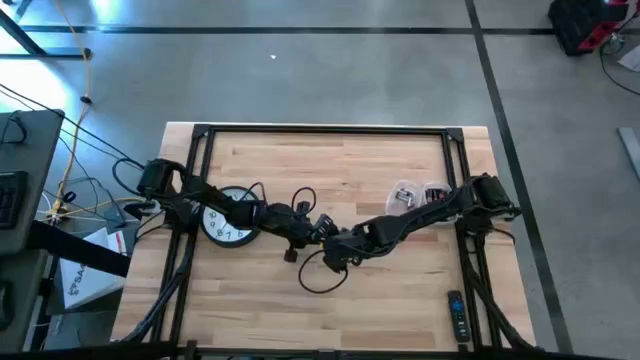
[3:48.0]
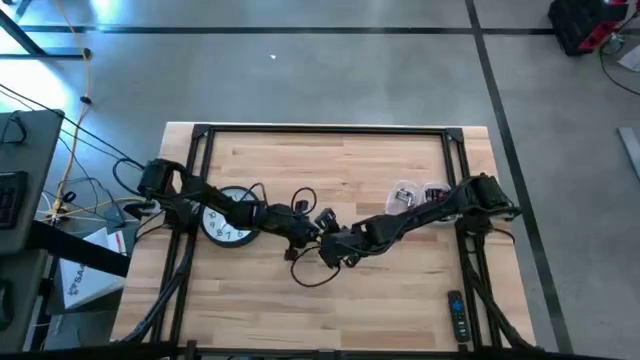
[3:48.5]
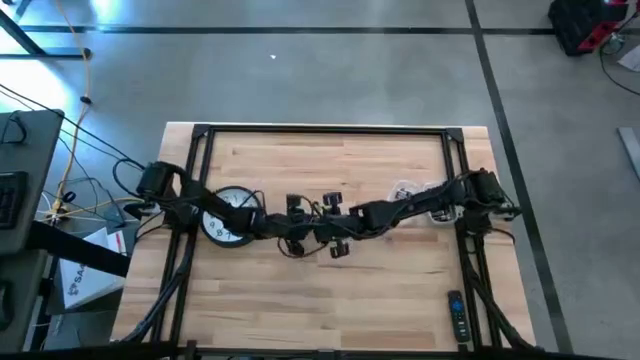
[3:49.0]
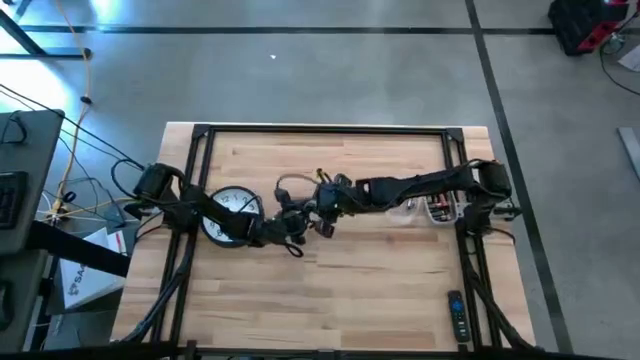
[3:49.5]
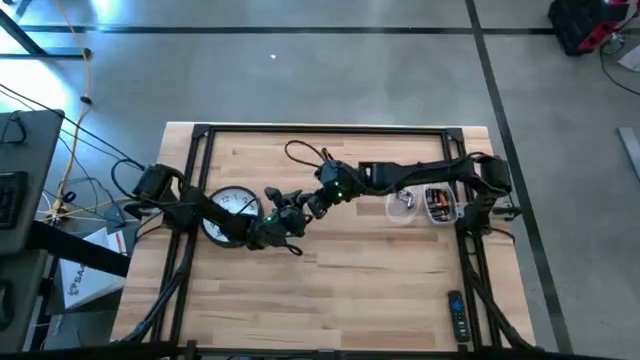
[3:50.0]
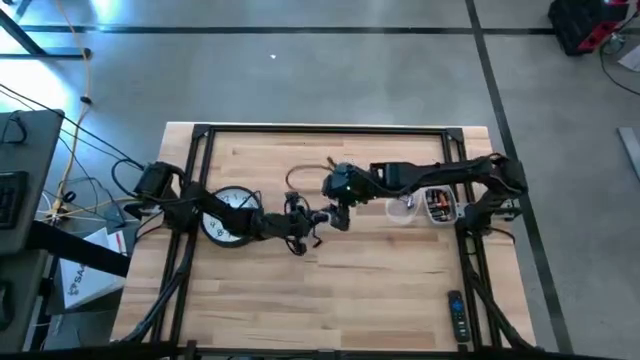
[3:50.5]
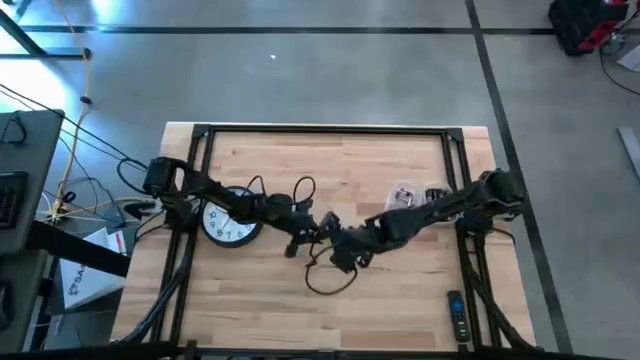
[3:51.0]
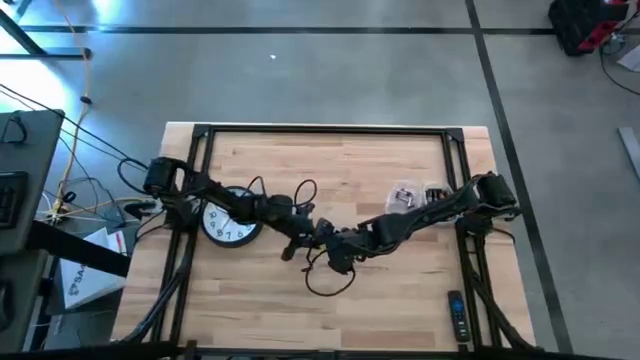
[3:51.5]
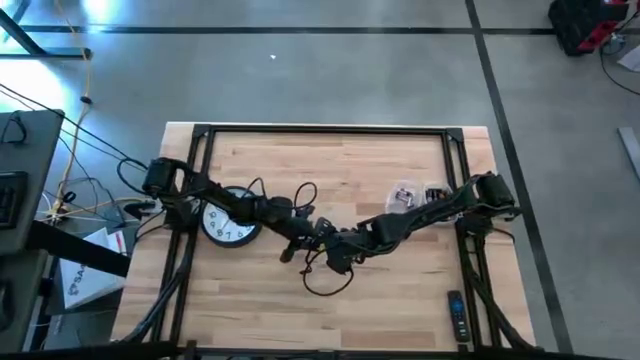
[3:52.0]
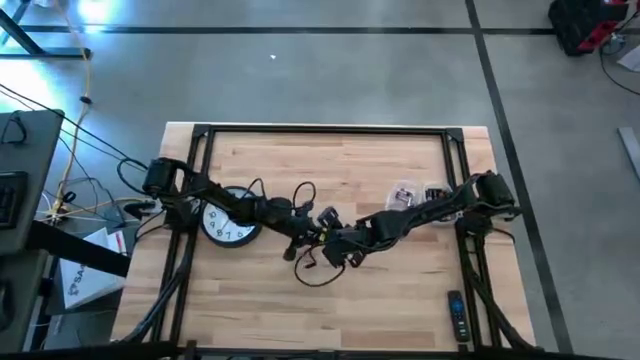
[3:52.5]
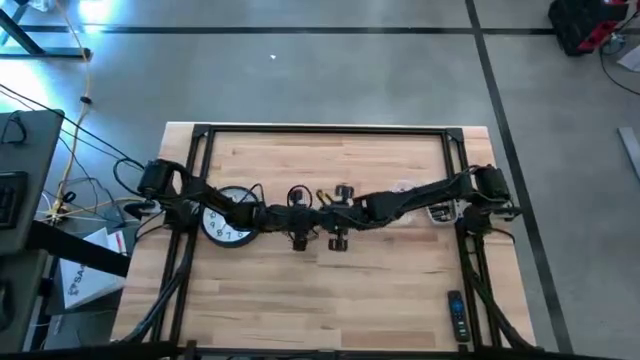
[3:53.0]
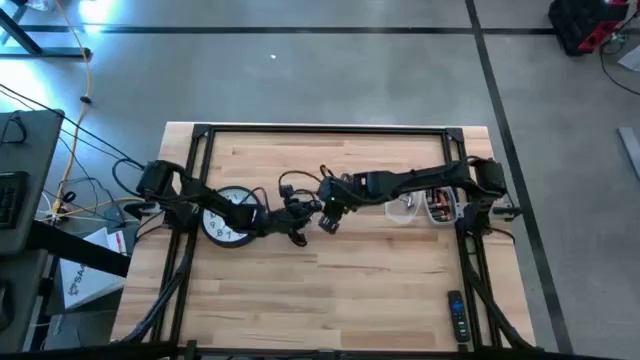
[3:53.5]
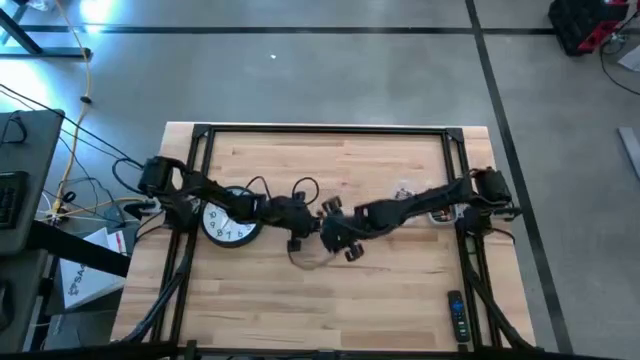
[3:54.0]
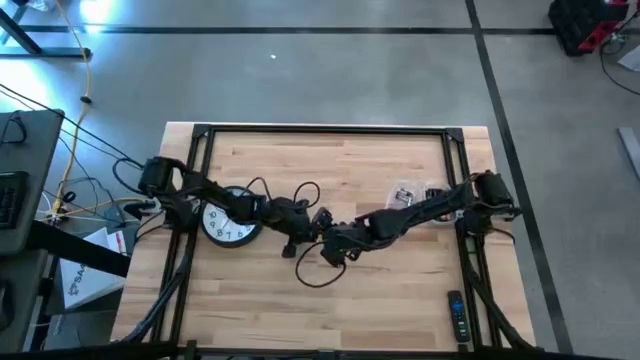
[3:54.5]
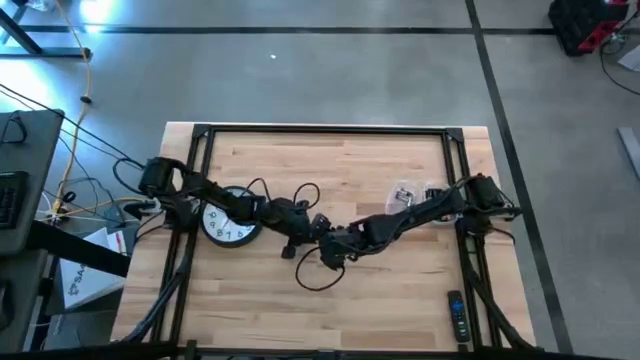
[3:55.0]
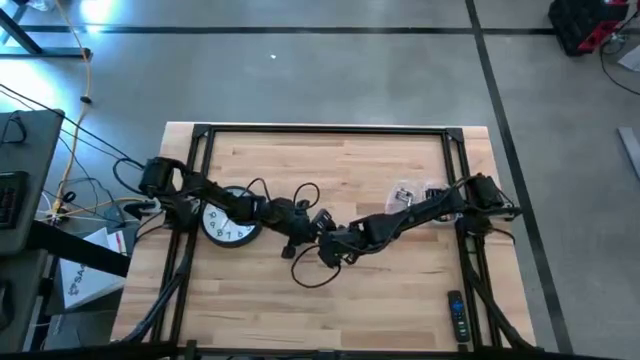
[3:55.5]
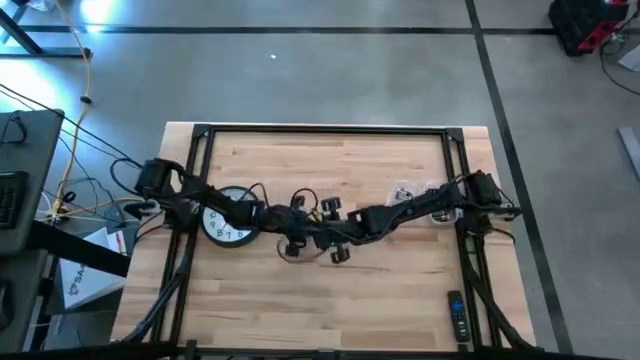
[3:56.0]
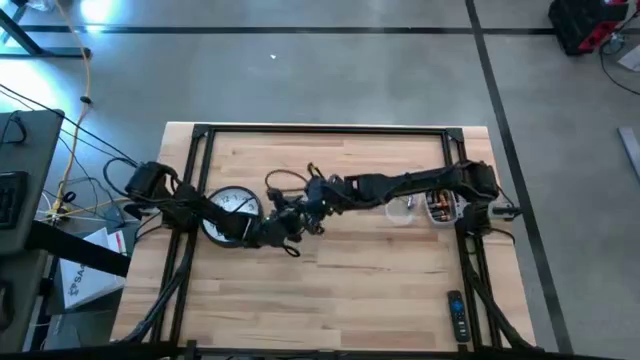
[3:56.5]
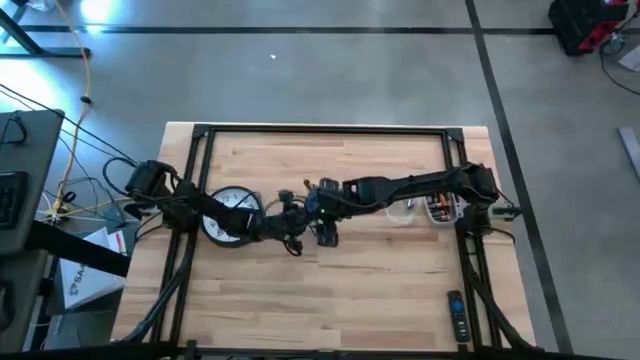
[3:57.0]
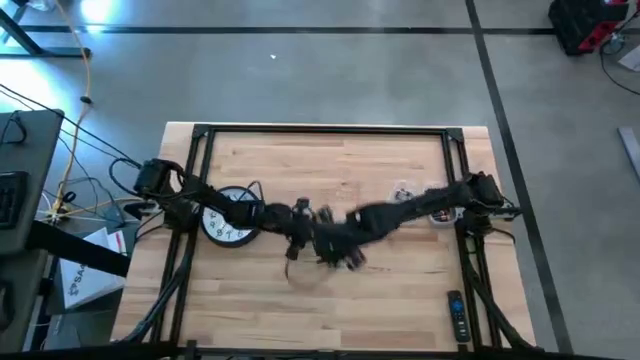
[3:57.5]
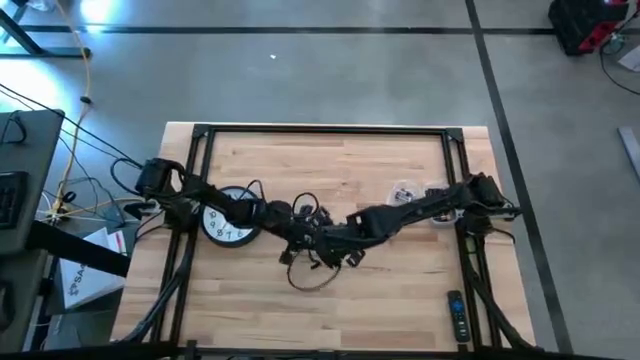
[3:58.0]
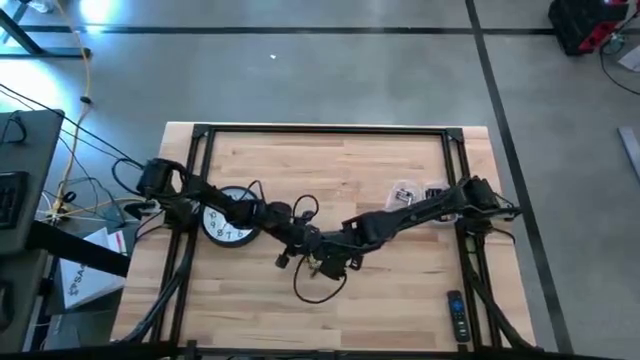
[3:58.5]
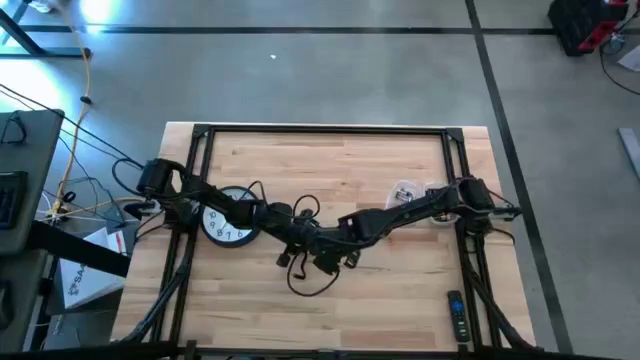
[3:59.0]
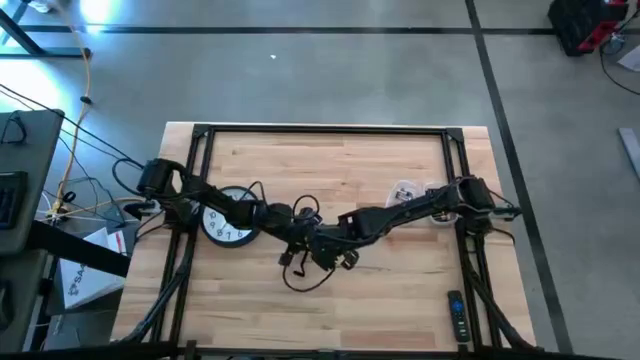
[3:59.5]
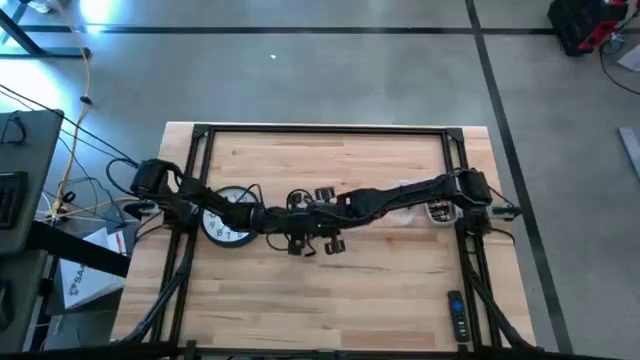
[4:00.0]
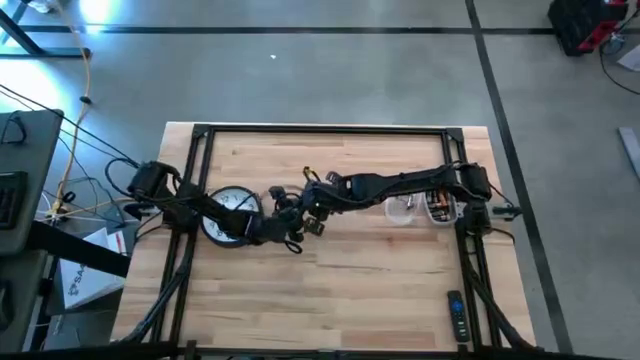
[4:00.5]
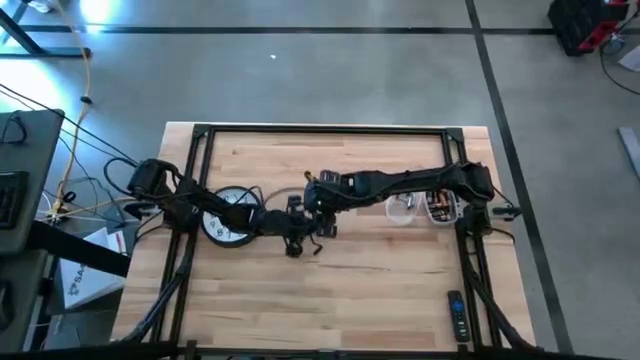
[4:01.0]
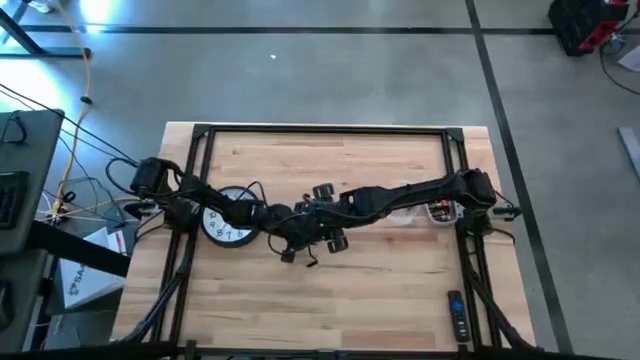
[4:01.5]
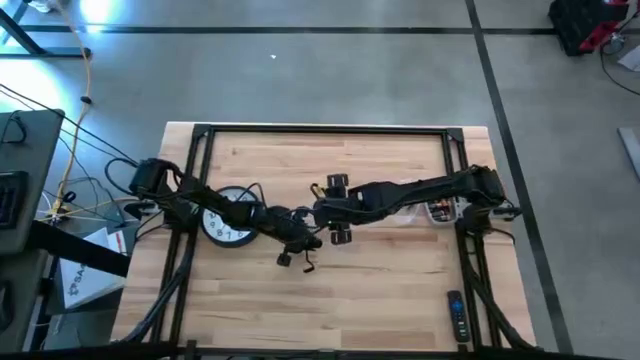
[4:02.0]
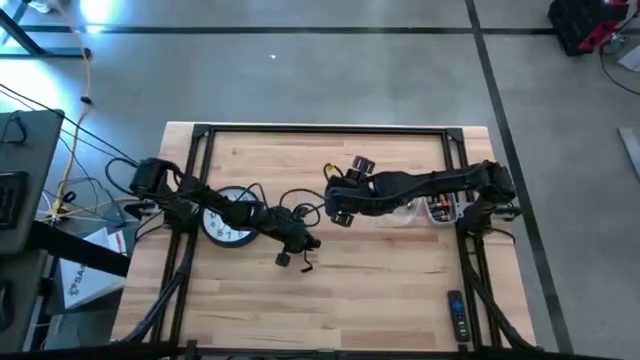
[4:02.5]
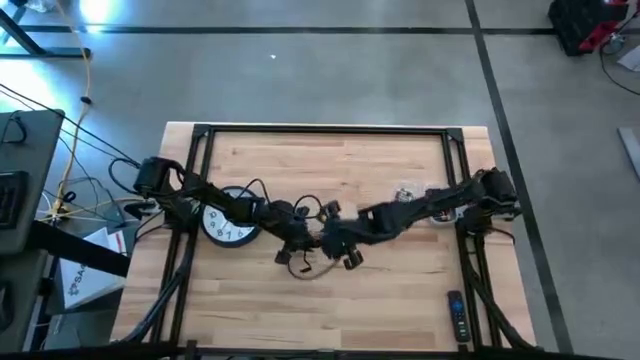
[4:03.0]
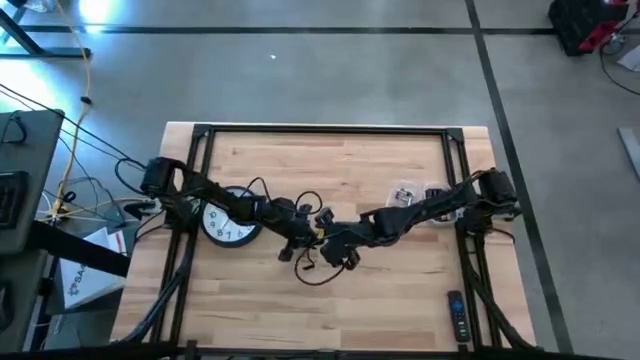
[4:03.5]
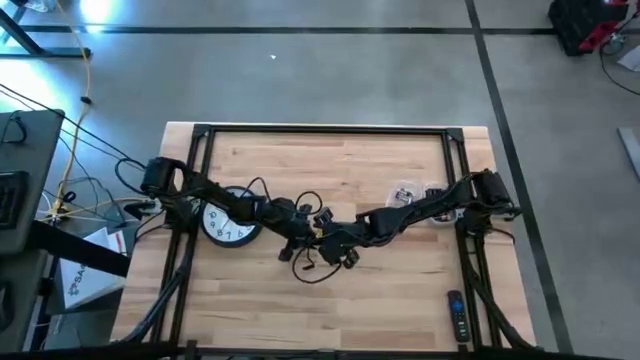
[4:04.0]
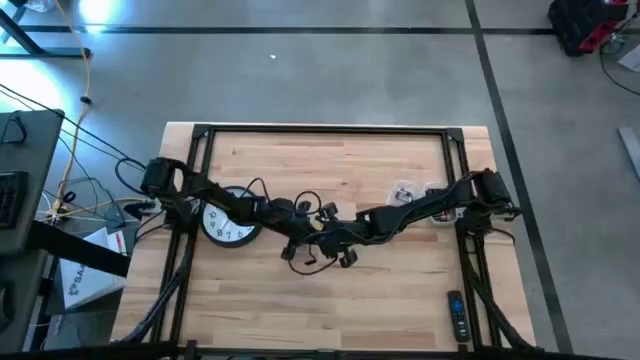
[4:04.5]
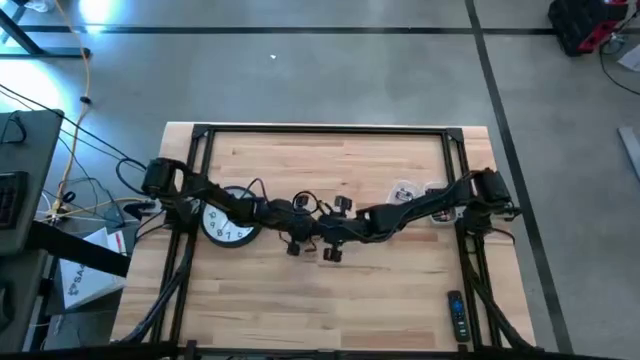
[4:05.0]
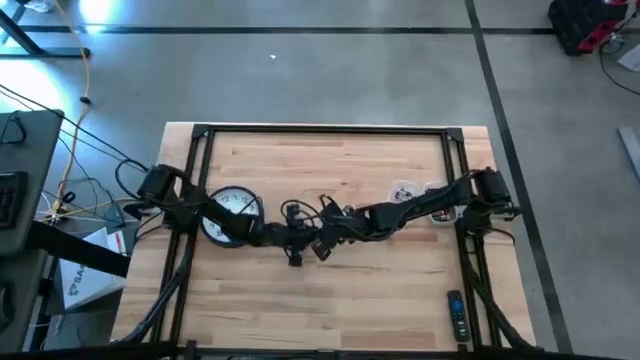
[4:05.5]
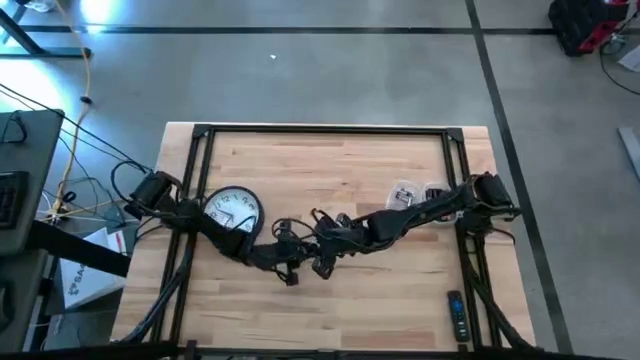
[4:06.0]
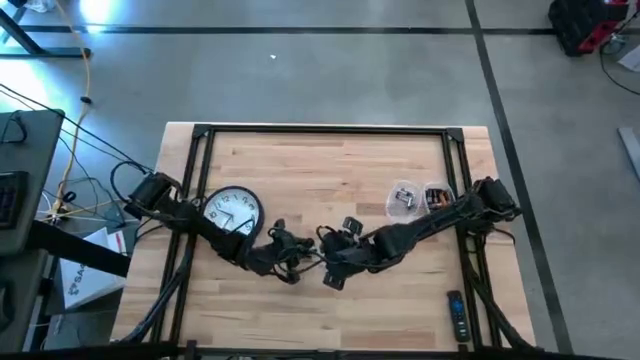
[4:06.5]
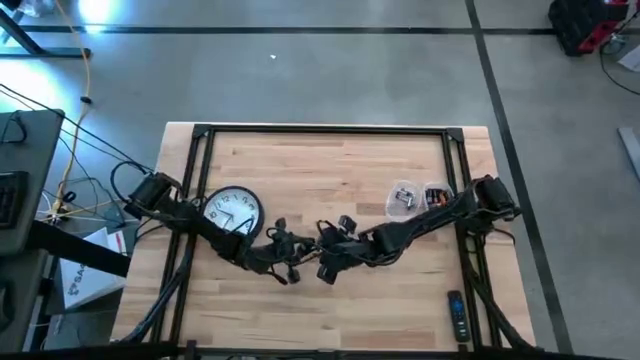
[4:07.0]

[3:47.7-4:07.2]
Task: Insert battery
Close the black flashlight lid
